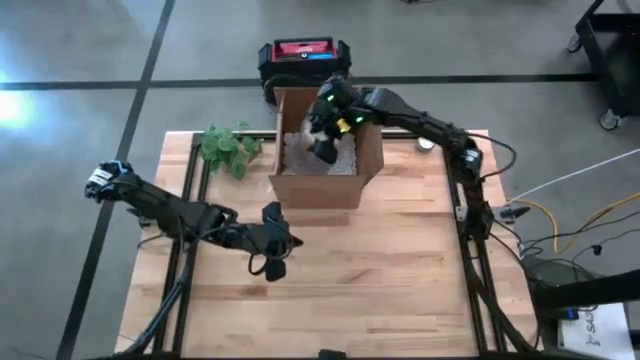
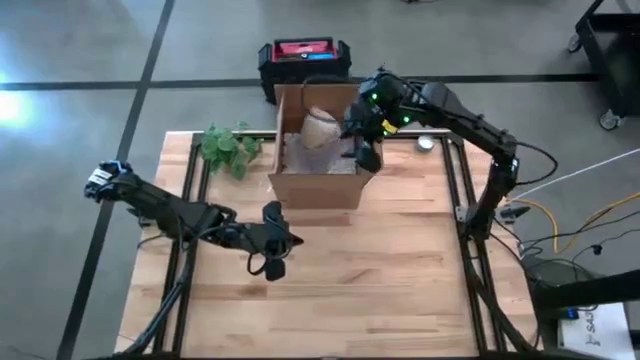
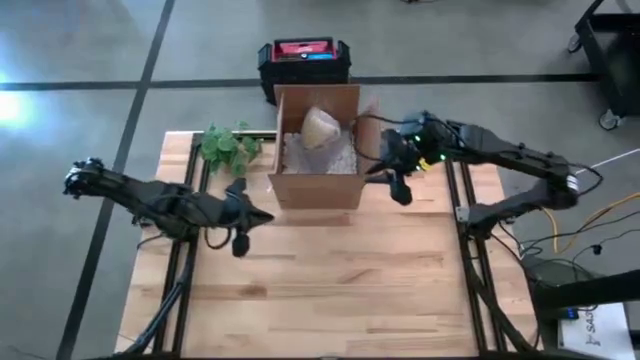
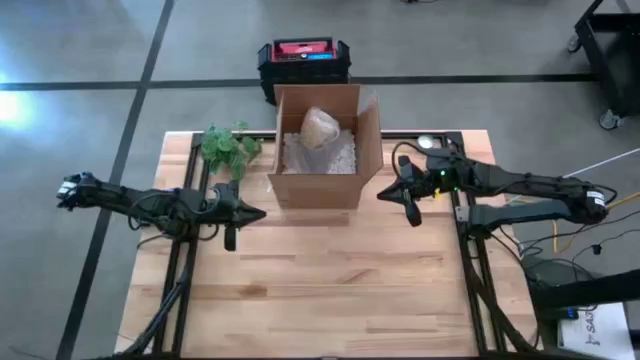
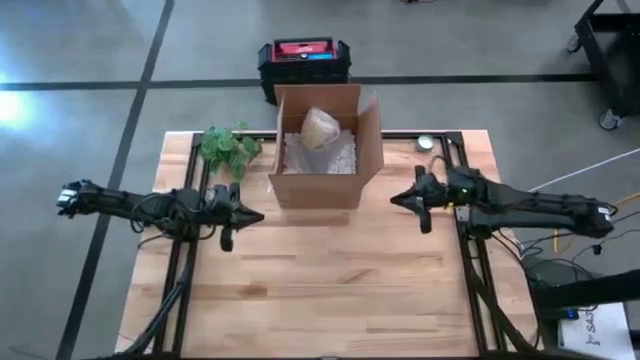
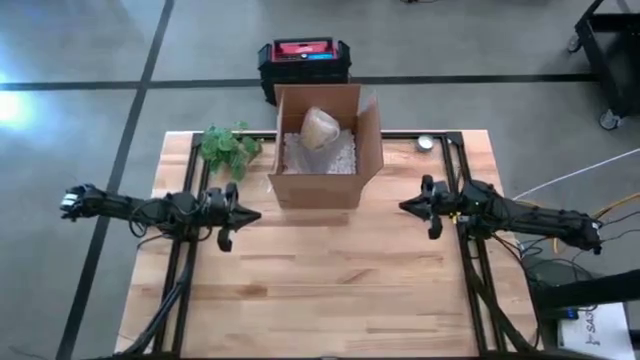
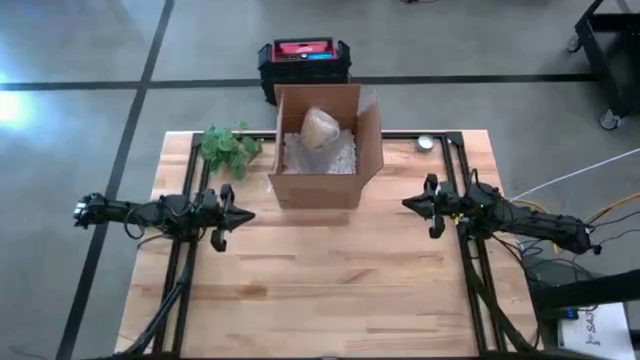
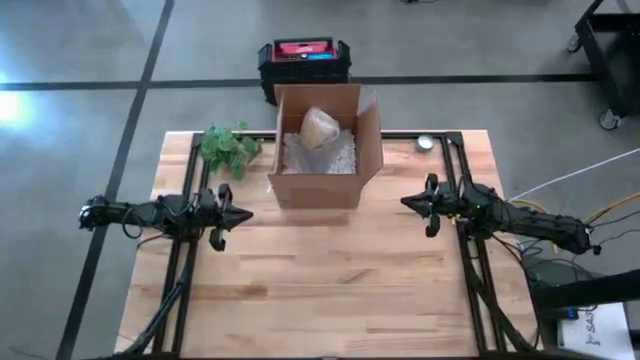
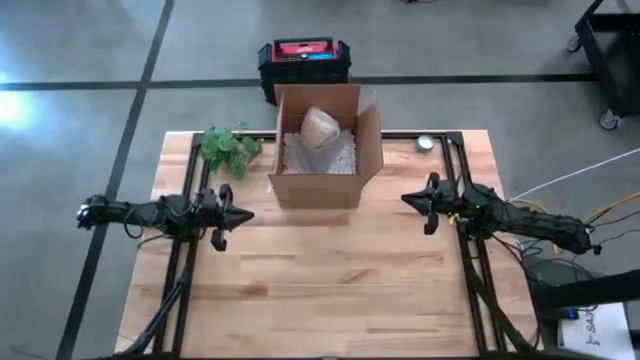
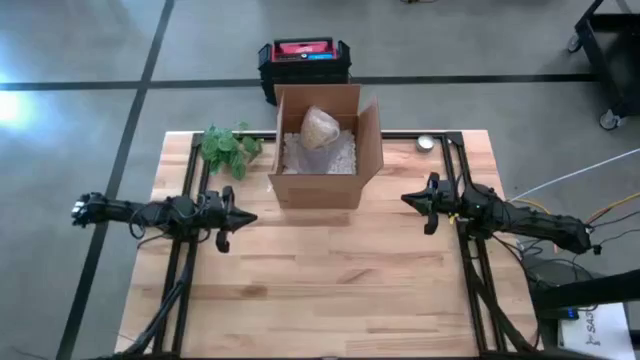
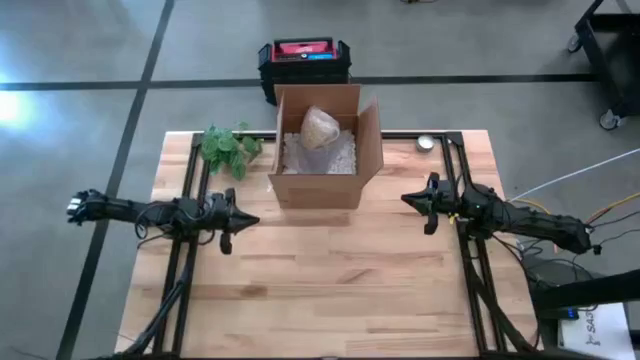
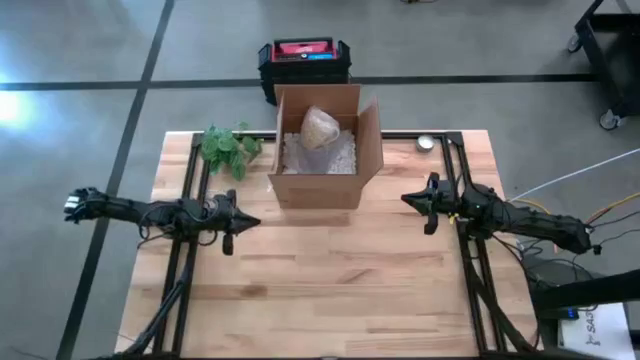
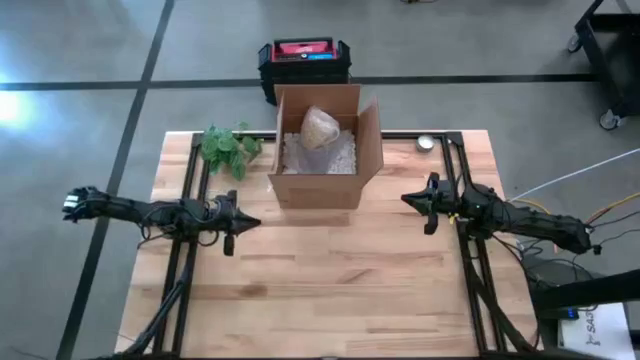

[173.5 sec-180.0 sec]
Task: wrap mug
Return to Home Position

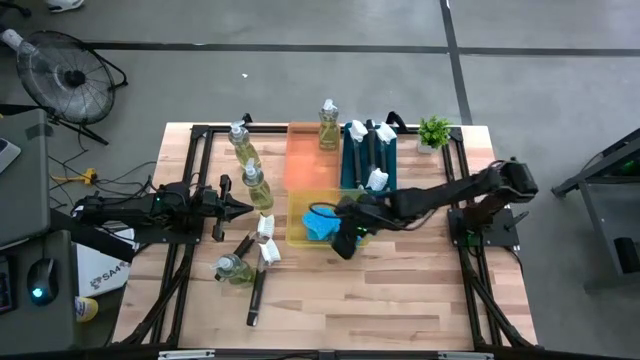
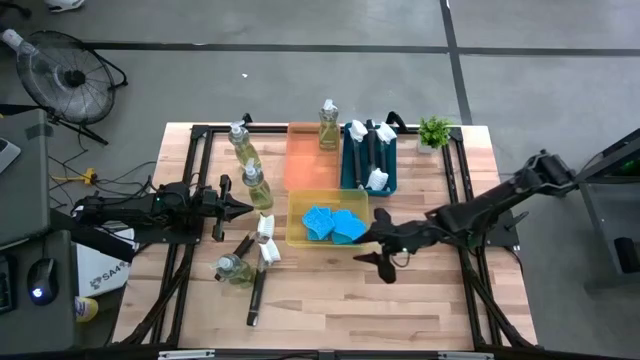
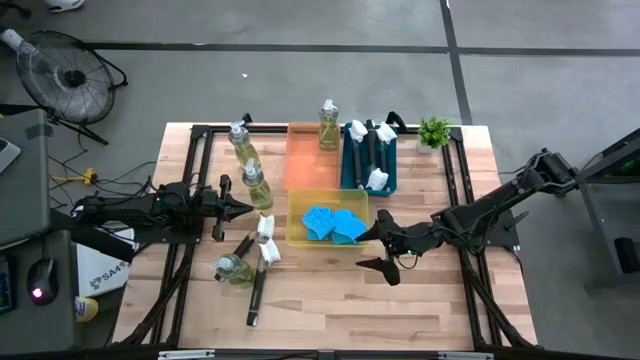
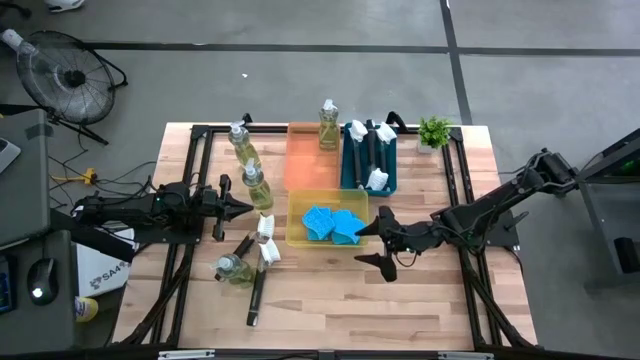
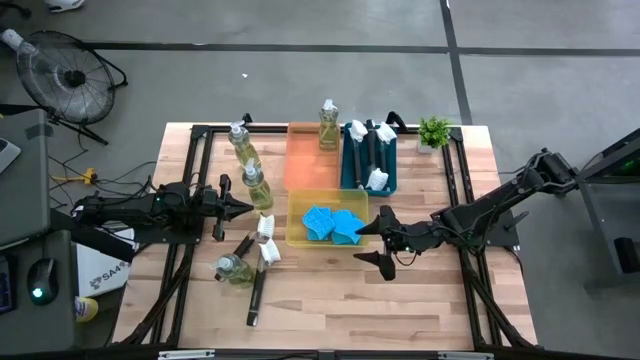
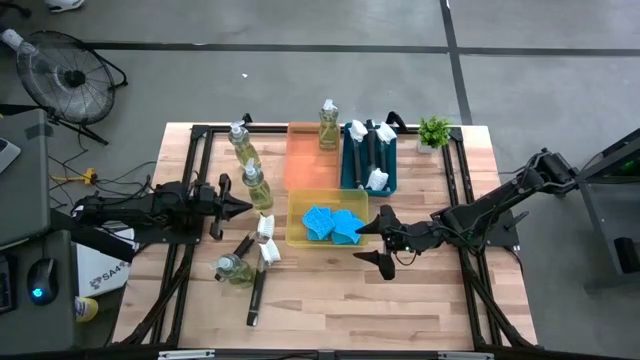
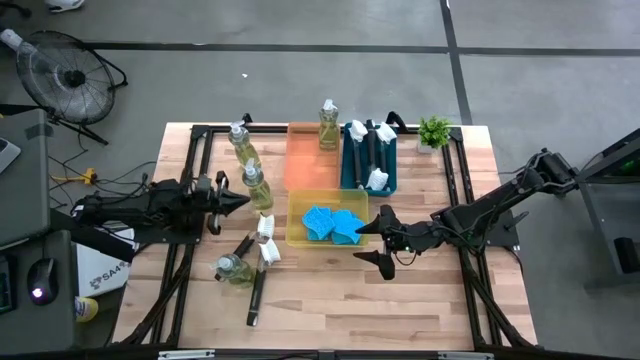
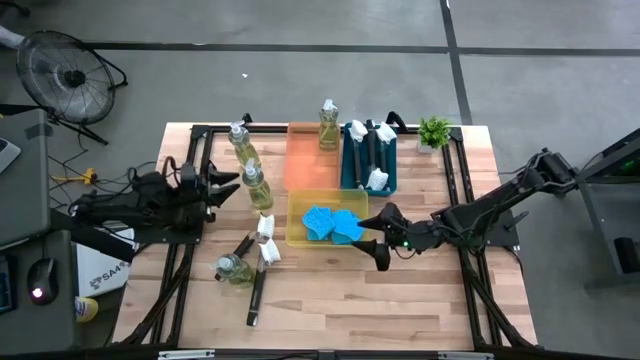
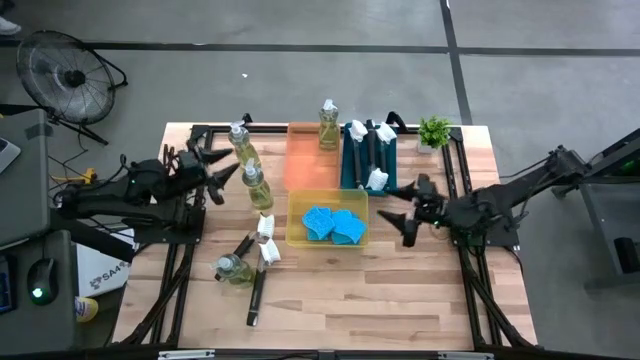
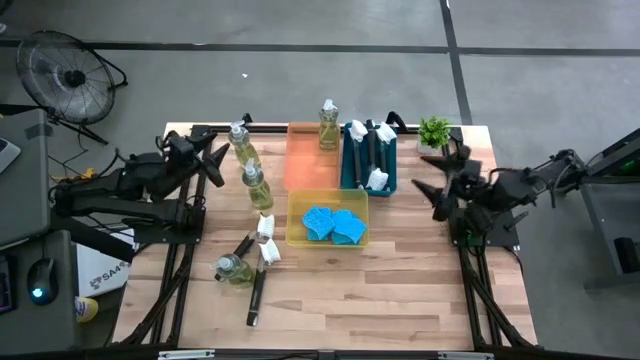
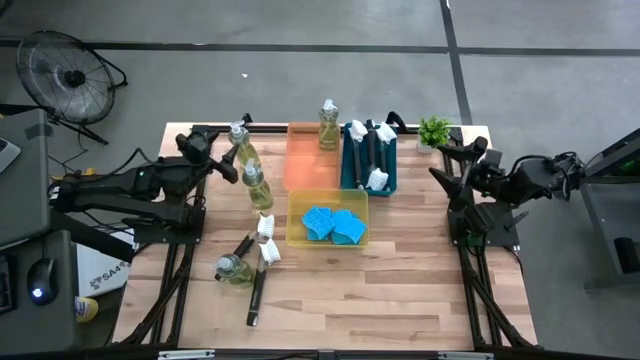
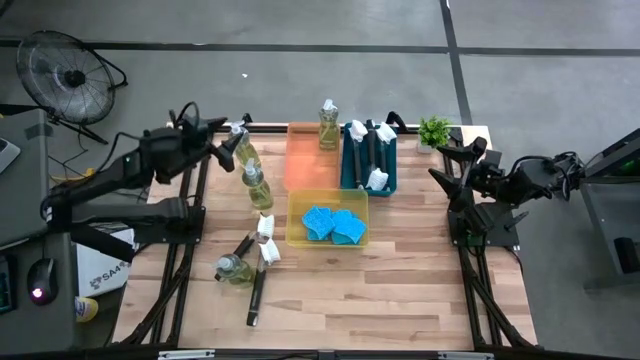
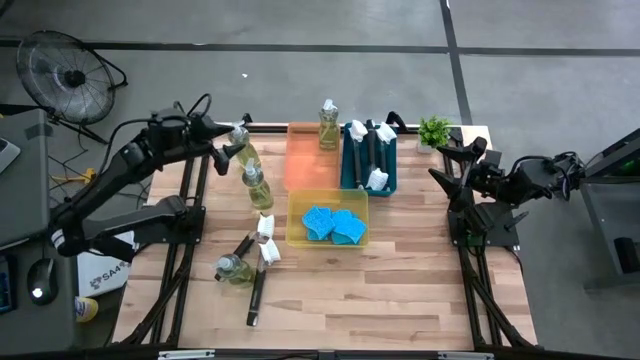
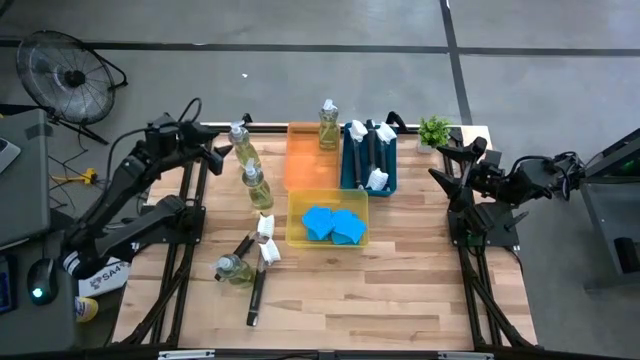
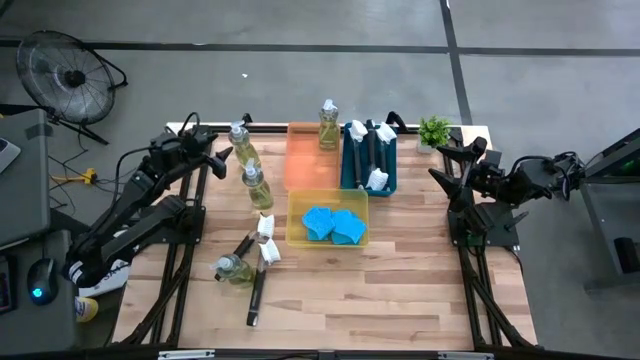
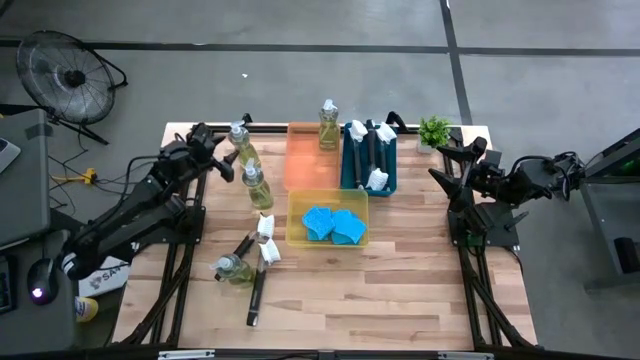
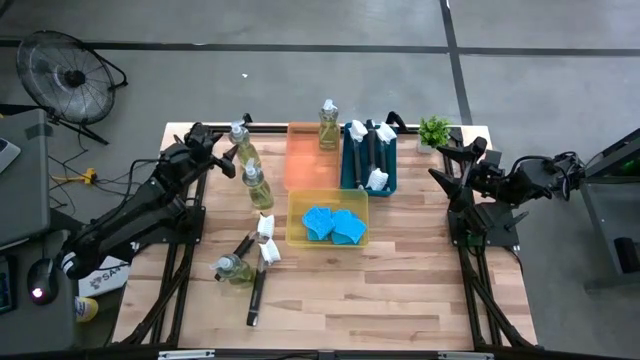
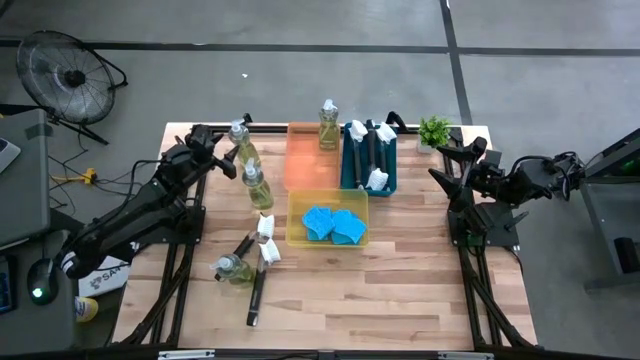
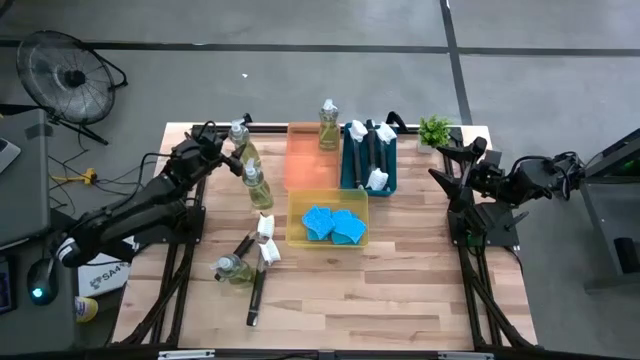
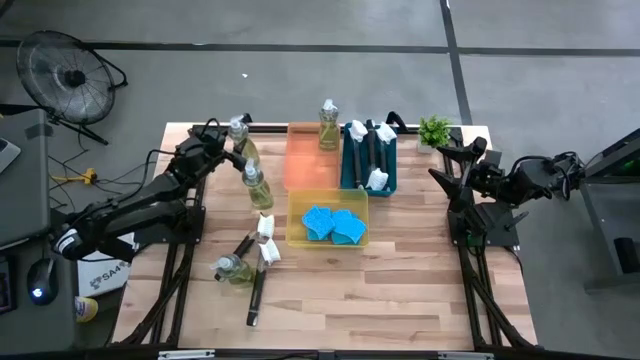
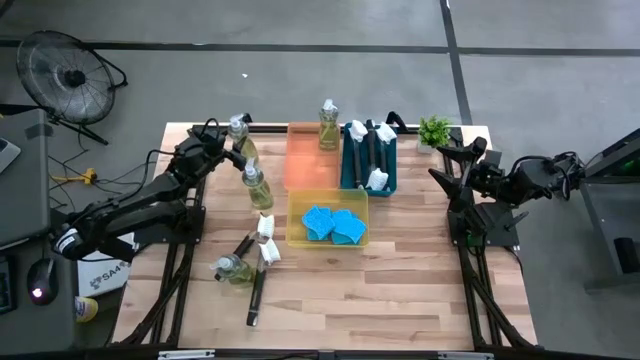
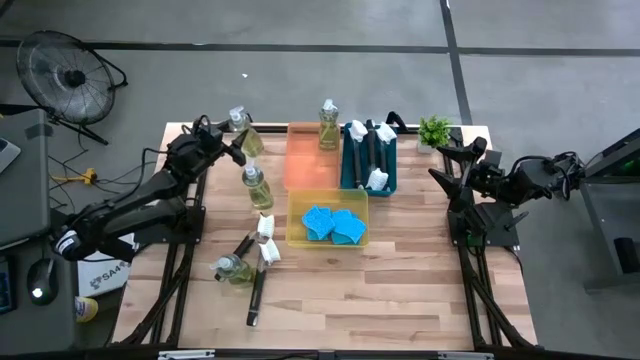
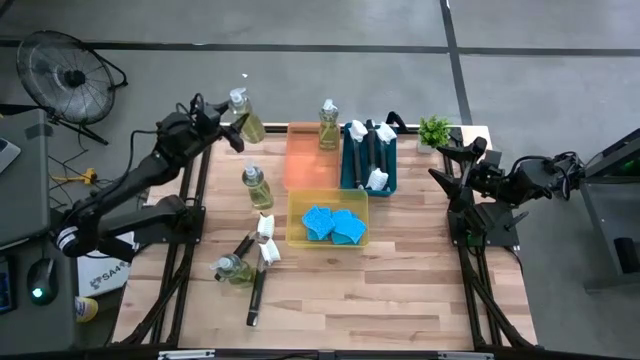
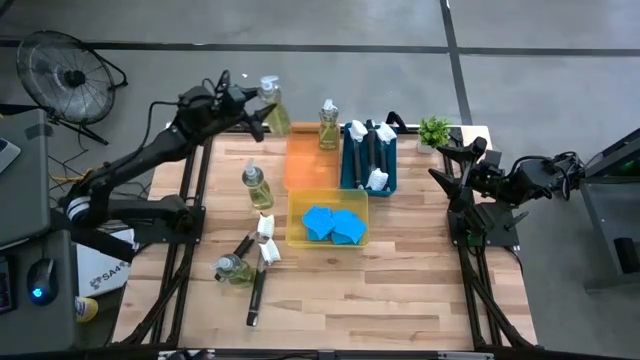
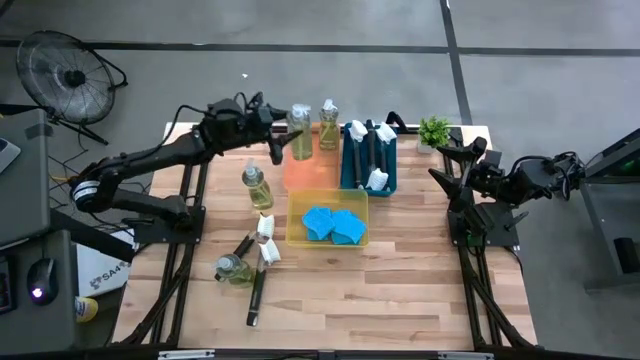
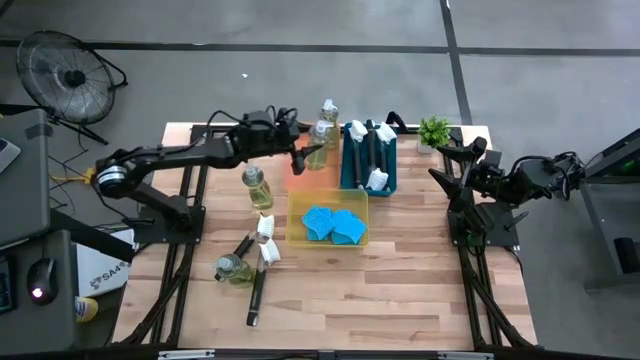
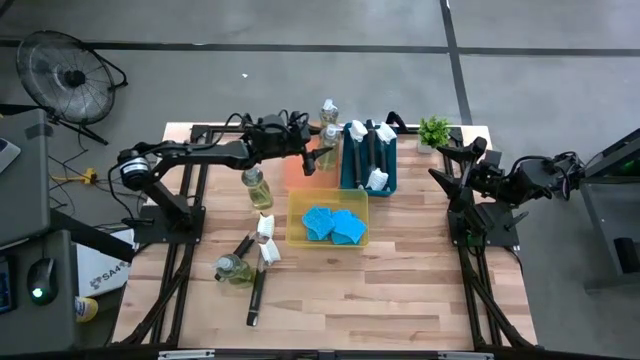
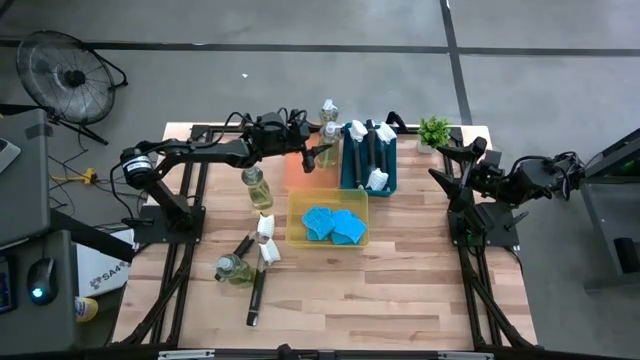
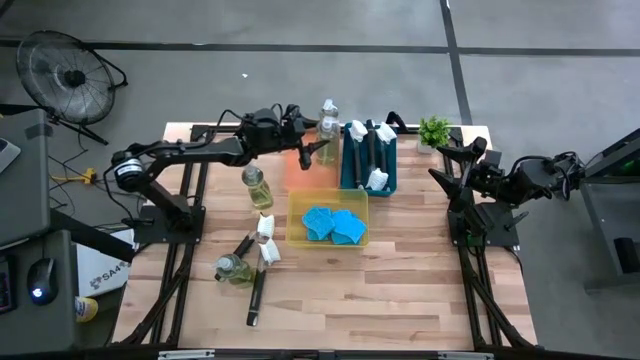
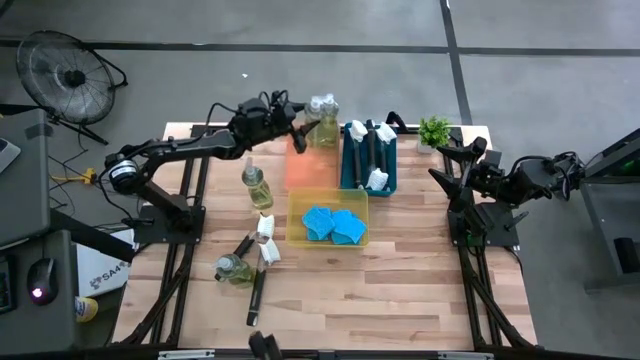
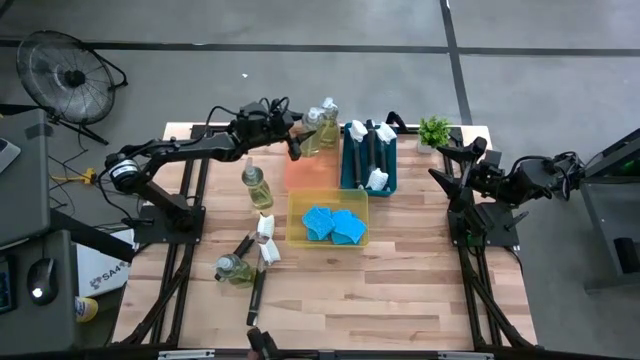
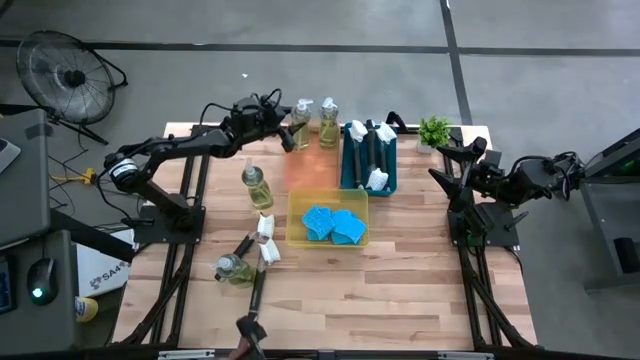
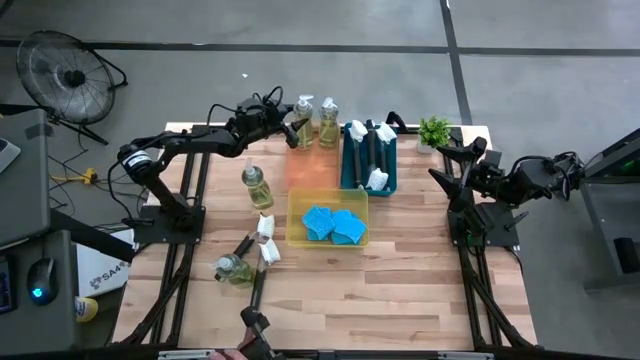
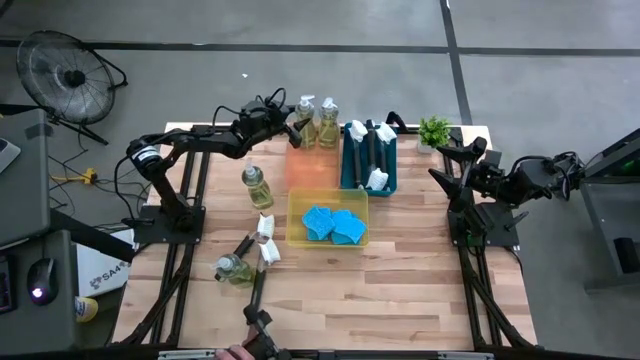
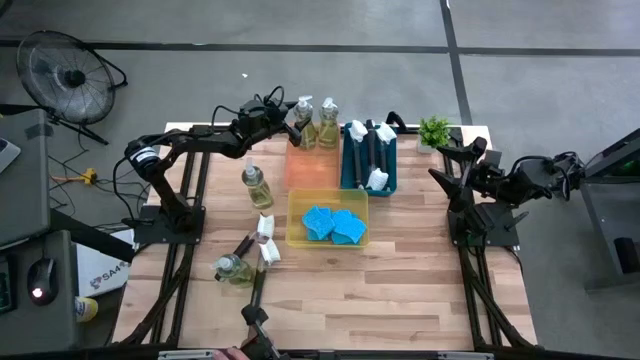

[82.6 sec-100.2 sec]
Task: Pick & Place Kitchen Sink Supplies
Put the dish soap into the orange bin
